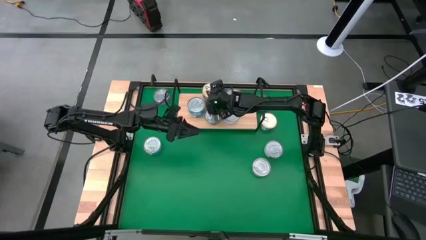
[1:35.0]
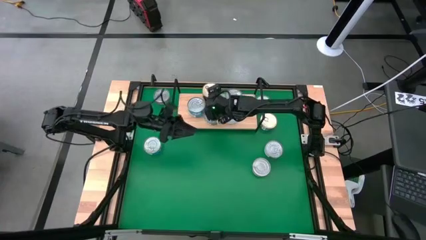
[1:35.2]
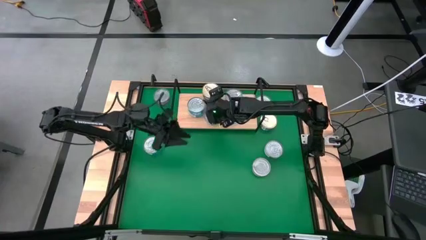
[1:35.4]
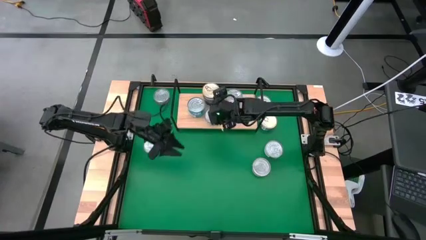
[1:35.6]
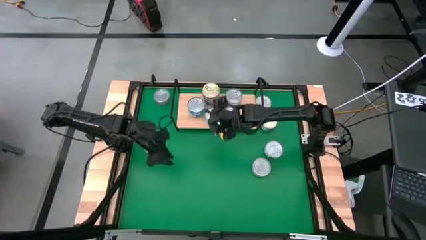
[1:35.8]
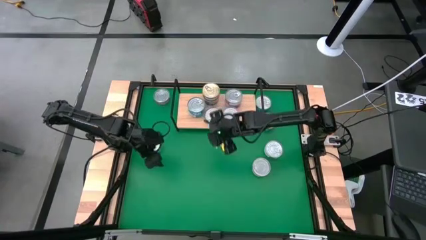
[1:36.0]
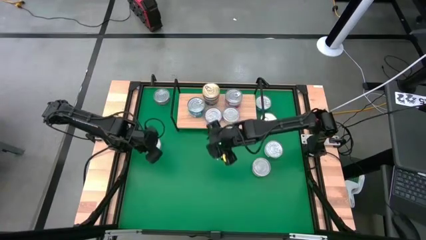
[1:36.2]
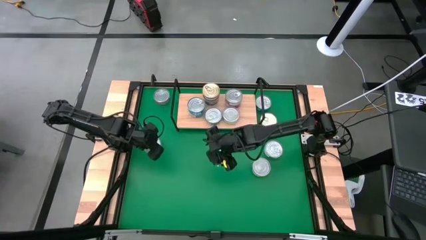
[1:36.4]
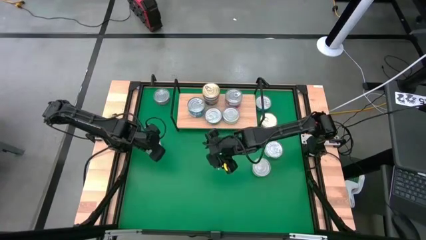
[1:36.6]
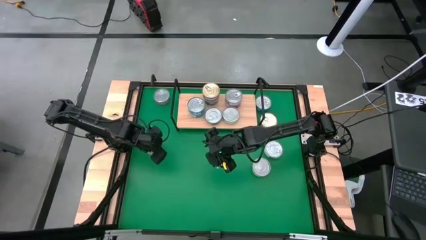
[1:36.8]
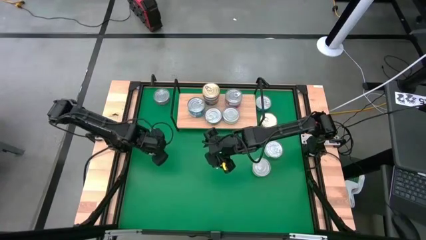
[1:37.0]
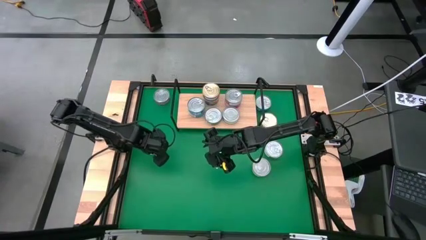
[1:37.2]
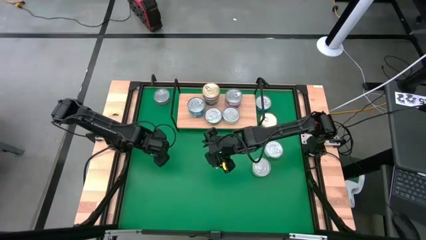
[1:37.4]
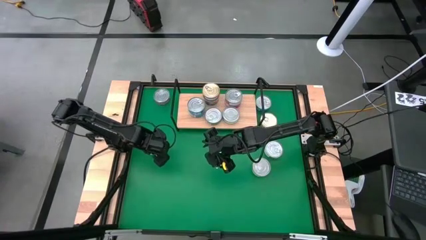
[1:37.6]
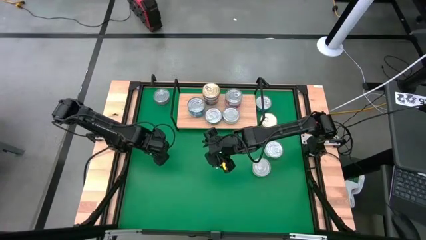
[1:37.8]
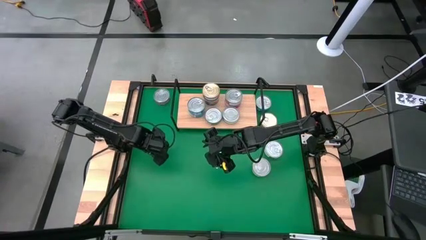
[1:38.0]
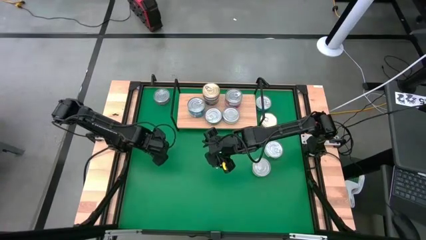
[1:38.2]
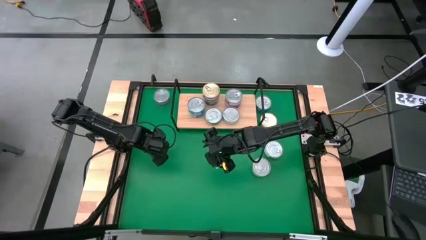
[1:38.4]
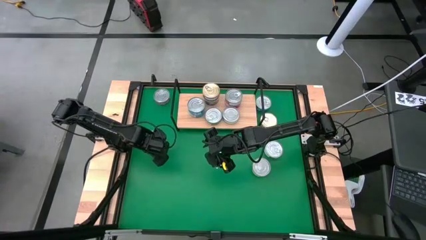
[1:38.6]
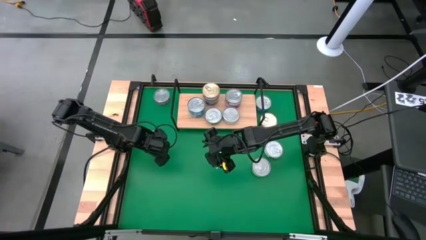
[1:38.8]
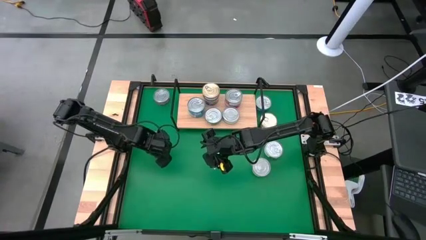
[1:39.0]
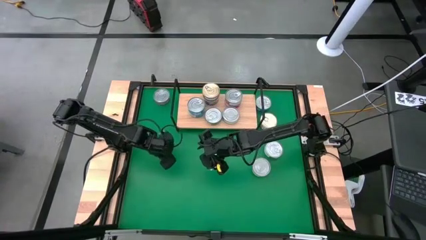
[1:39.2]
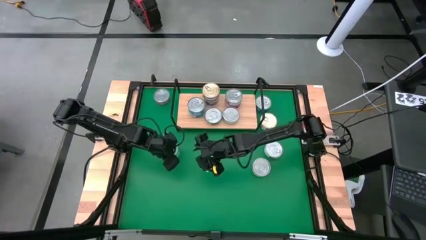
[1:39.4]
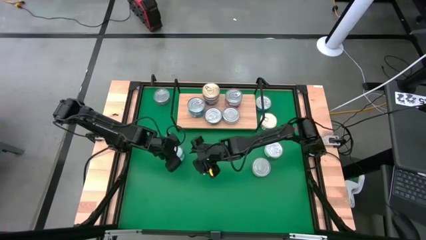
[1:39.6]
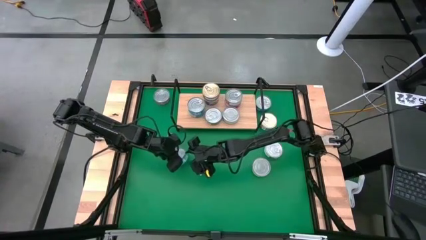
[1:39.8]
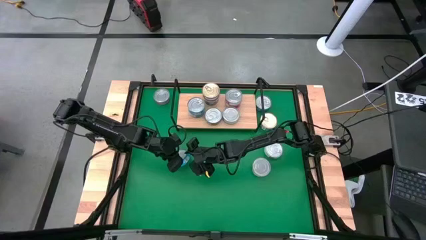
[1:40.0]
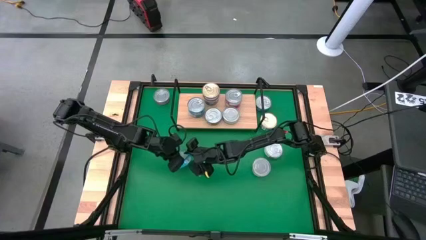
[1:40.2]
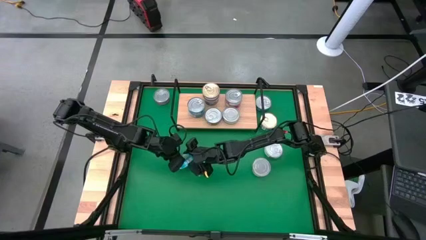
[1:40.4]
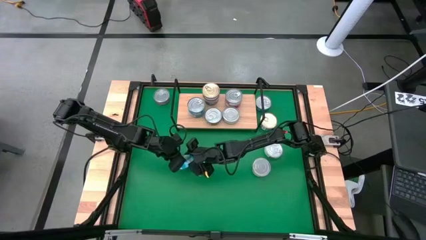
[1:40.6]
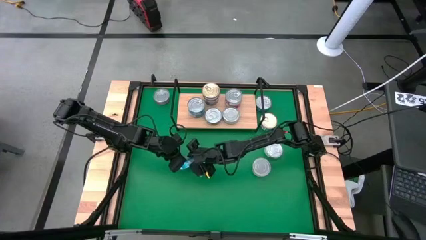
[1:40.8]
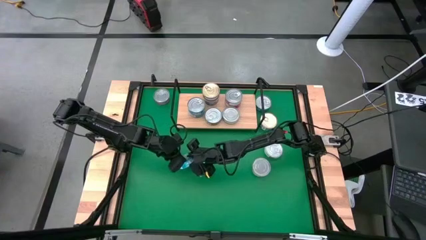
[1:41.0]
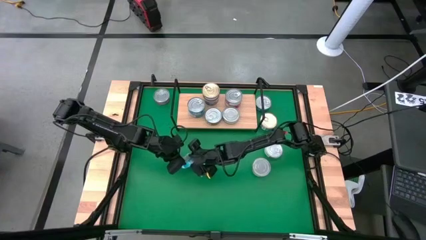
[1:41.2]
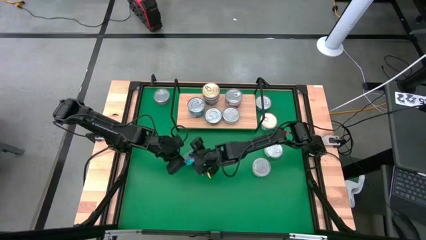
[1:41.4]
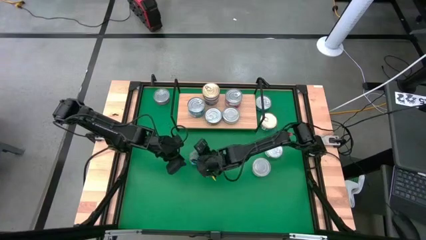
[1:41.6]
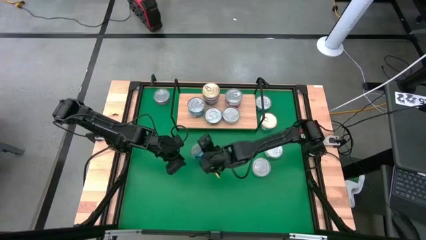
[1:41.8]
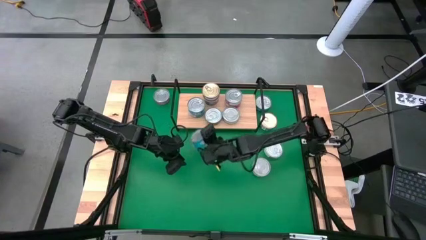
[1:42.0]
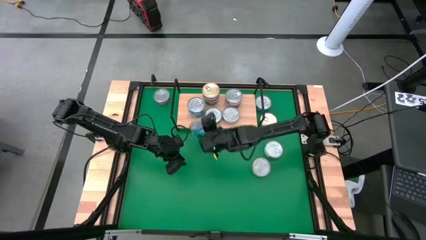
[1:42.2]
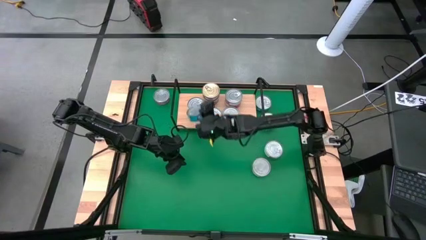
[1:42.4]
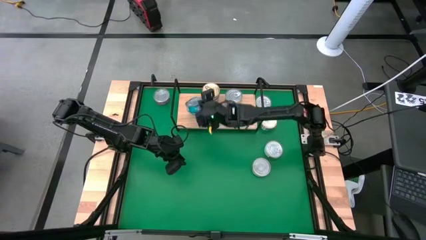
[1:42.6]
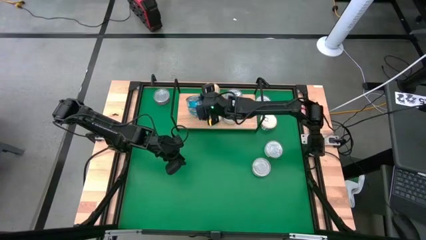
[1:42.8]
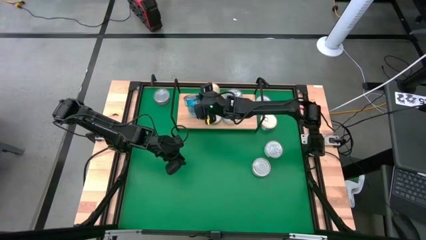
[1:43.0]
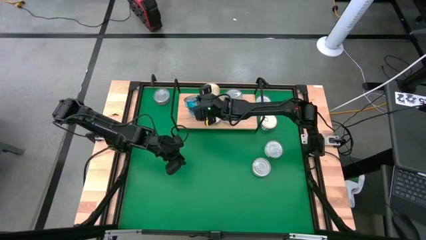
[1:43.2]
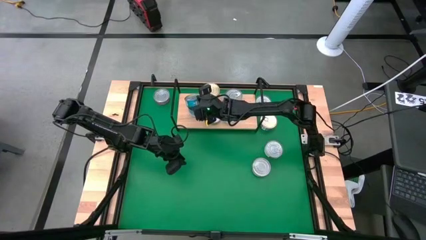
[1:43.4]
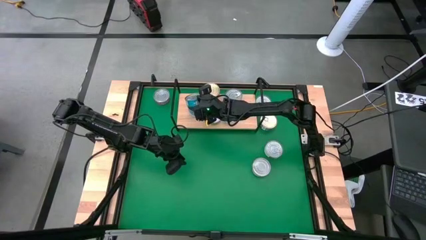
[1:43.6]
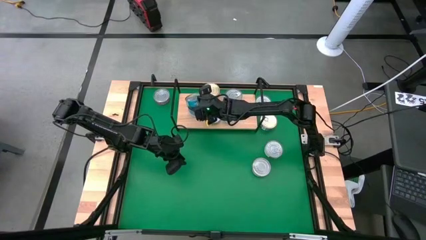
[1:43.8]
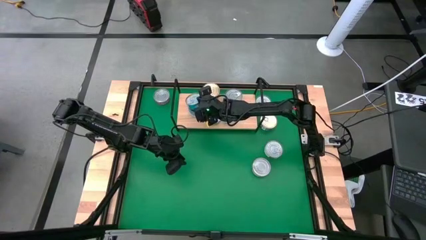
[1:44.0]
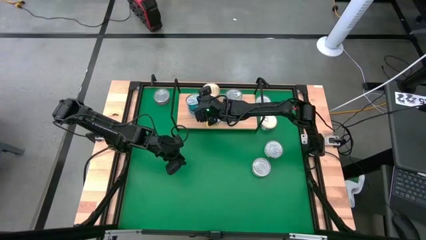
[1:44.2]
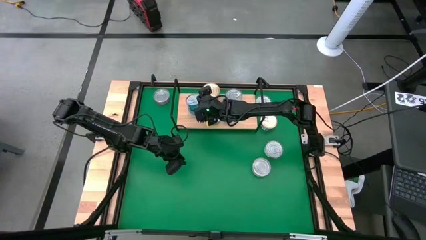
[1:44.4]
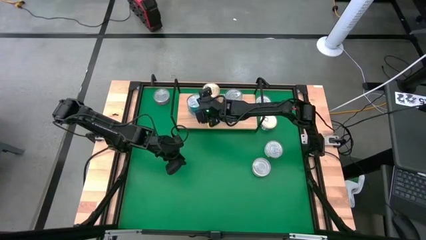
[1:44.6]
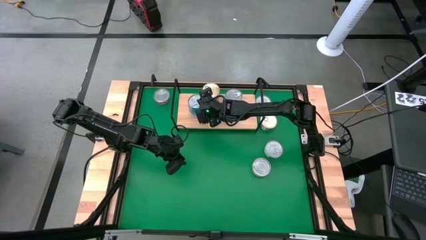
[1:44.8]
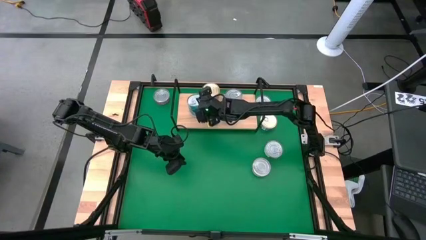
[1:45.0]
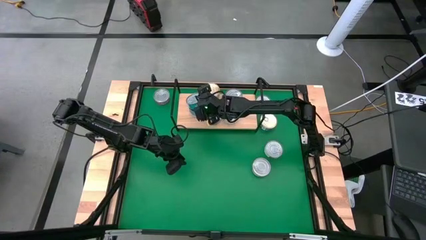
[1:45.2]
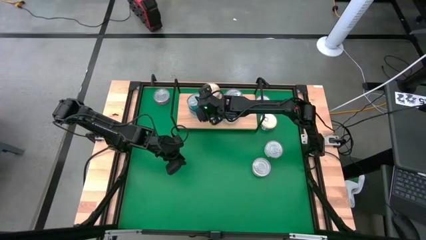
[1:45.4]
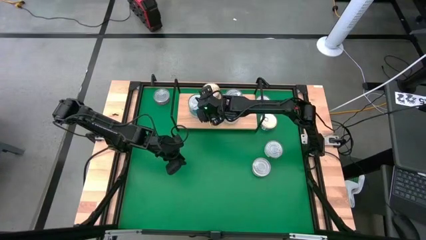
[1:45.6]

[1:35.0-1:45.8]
Task: Stack canned seafood by type on shelf
Stack the yellow blue tuna can on top of the yellow blue tuna can on the shelf
